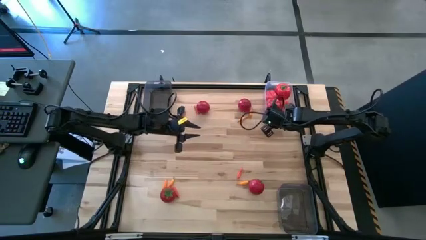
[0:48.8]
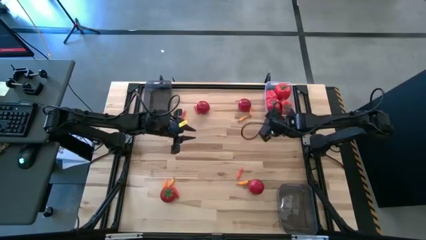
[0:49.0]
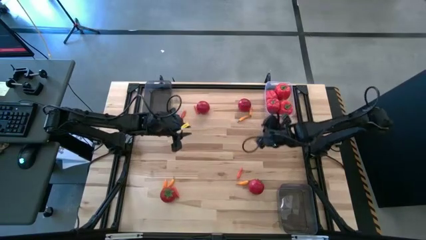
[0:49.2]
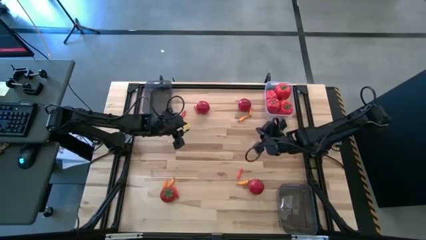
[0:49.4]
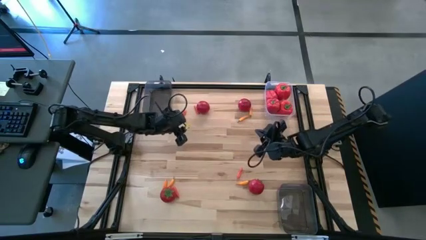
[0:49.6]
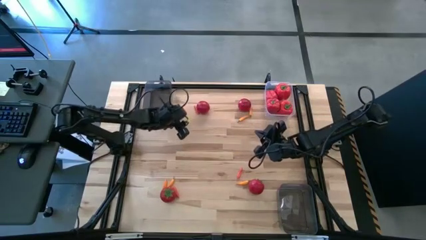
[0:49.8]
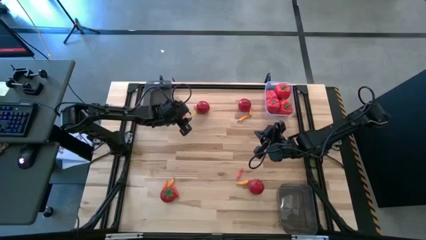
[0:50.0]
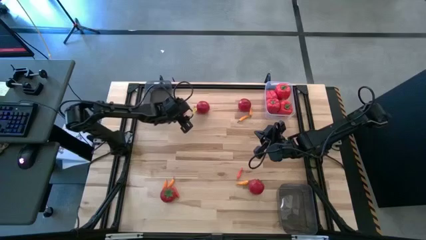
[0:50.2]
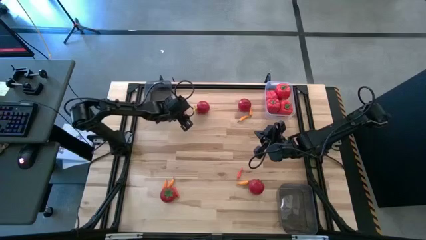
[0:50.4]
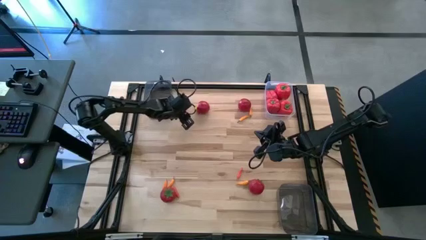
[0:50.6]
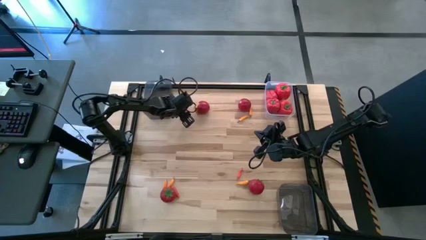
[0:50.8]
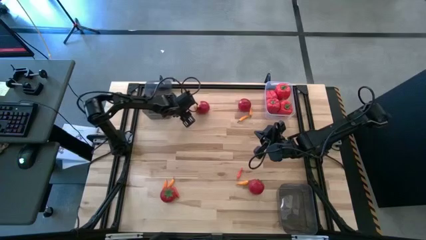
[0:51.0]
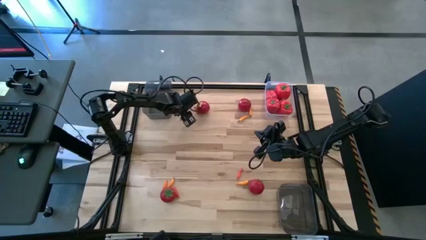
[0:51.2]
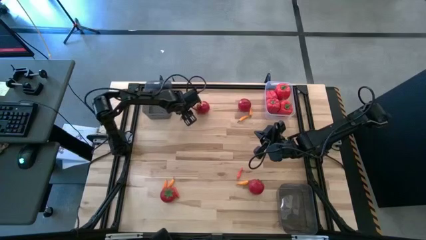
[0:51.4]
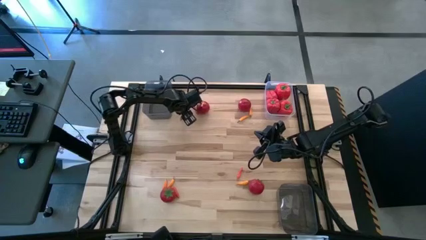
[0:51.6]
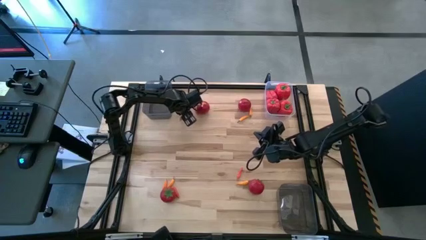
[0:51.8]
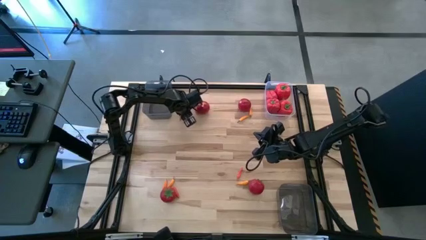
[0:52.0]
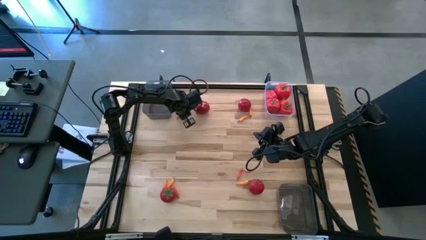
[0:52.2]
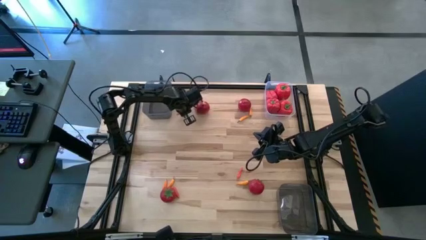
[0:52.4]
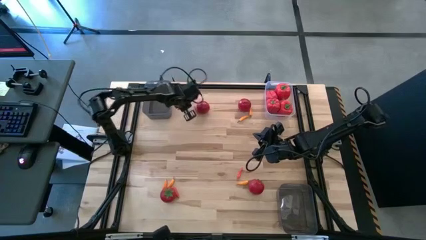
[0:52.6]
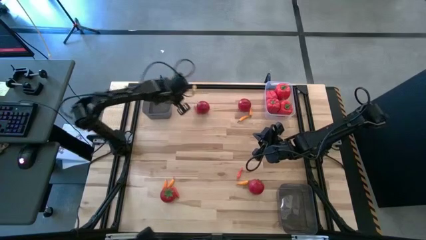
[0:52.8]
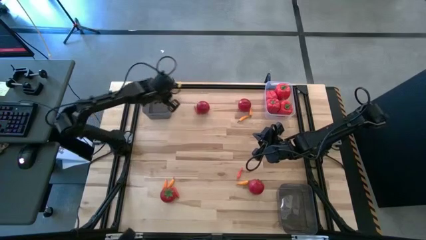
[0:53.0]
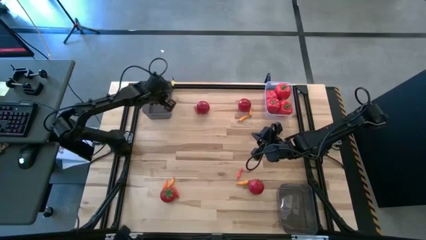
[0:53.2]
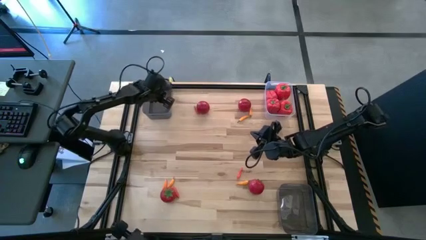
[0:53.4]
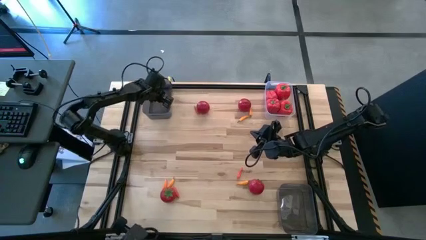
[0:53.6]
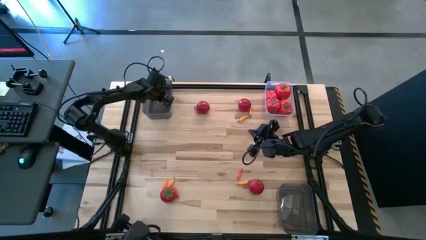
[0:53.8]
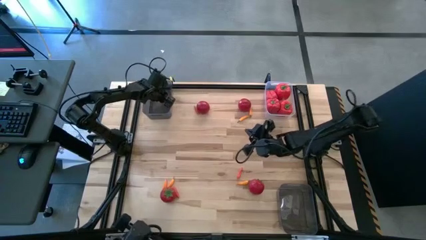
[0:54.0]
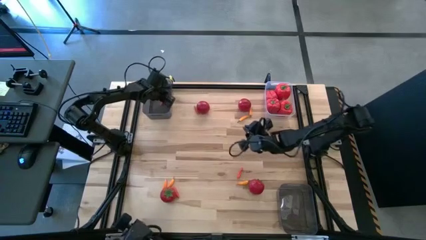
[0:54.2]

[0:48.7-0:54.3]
Task: Sort produce into baskets
Put the orange chili pepper into the top black bin

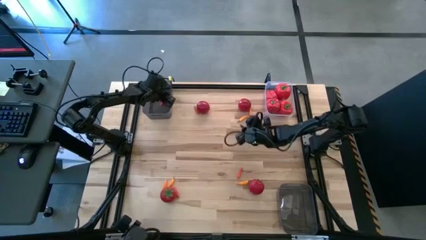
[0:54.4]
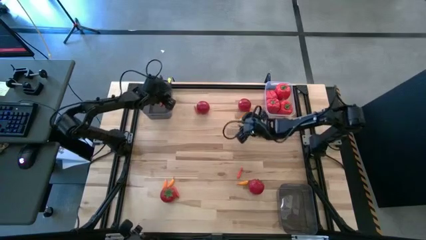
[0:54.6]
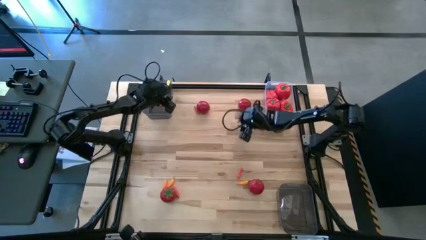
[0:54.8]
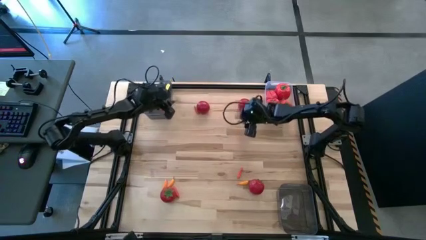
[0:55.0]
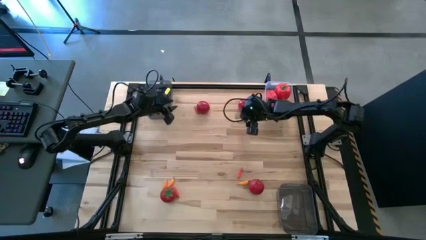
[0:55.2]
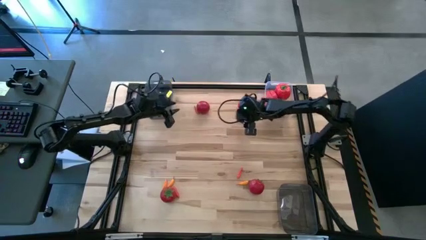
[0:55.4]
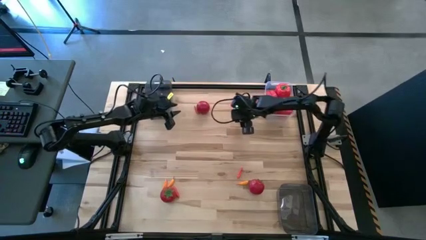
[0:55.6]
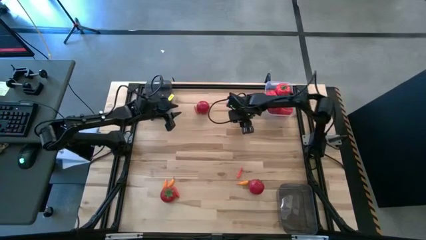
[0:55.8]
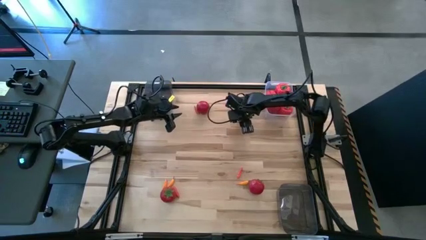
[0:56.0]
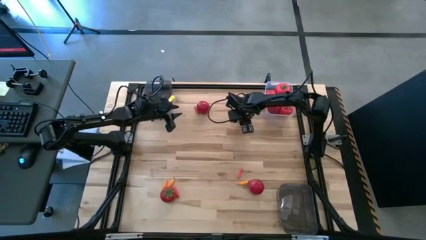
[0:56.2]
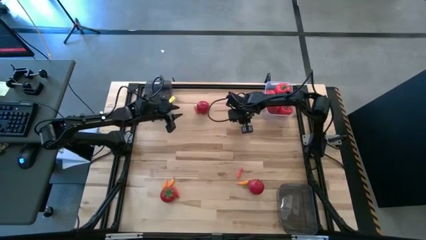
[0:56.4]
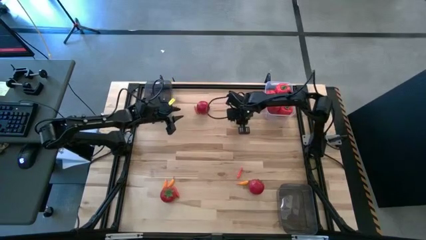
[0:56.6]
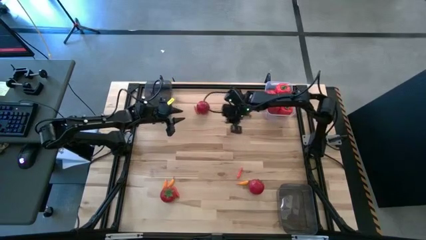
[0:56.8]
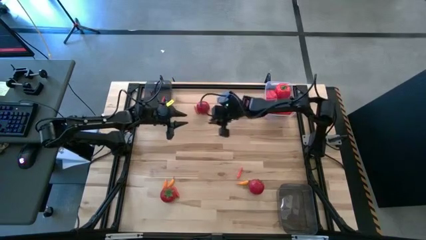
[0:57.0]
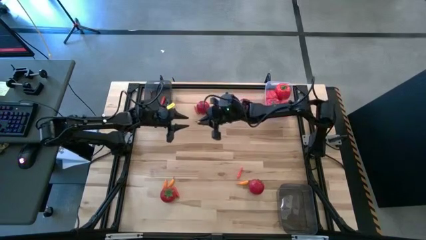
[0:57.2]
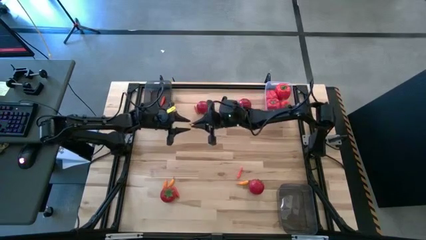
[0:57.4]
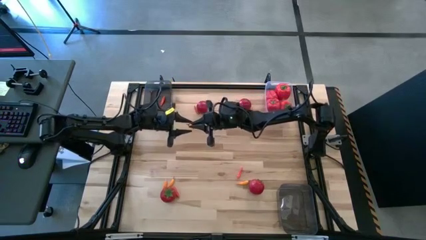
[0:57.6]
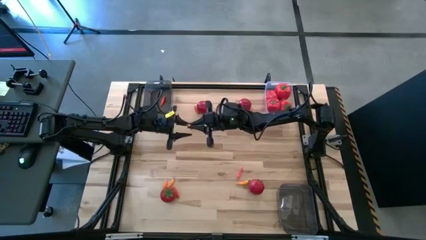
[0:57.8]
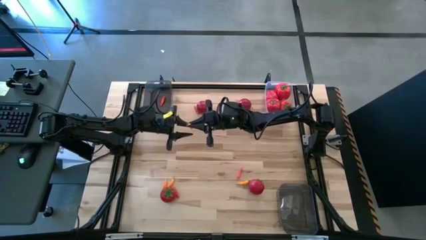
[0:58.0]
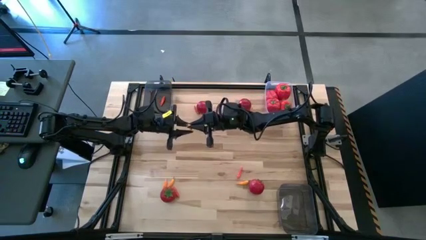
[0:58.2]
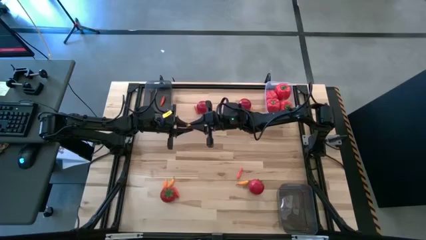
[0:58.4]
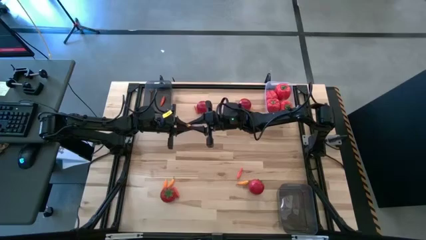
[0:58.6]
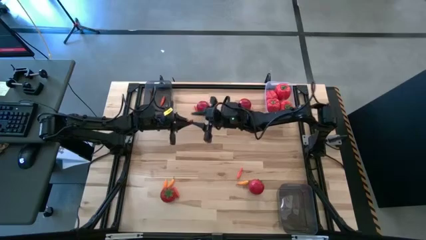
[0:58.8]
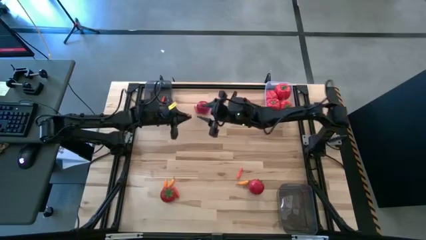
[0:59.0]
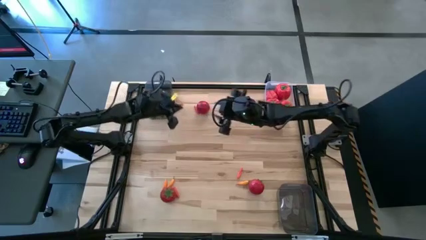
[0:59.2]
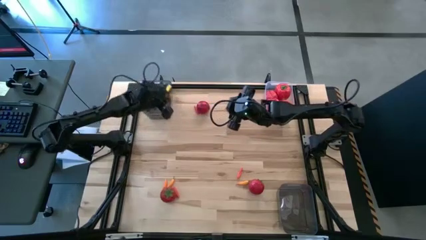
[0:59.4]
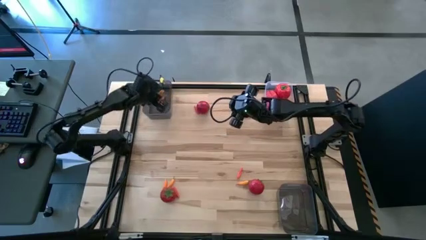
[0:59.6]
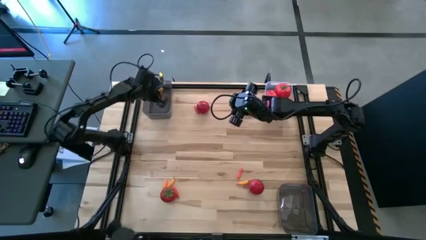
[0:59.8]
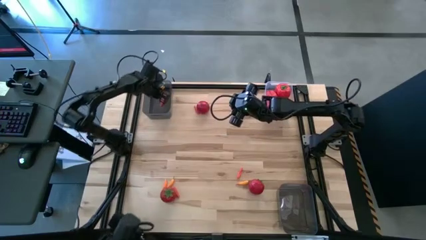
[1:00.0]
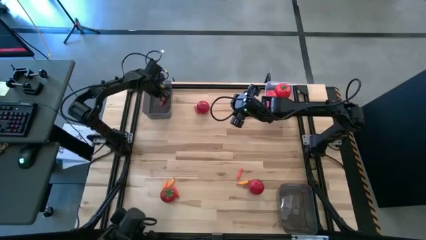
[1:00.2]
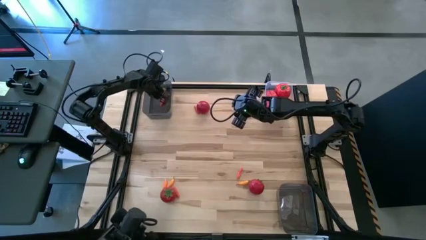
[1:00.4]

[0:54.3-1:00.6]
Put the yellow chili pepper into the top black bin

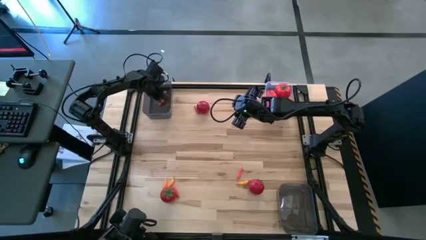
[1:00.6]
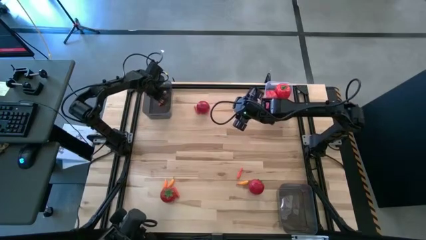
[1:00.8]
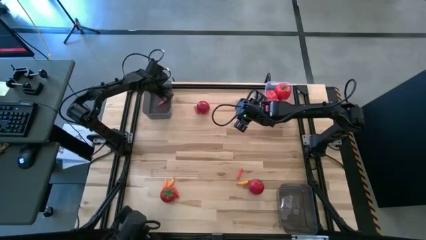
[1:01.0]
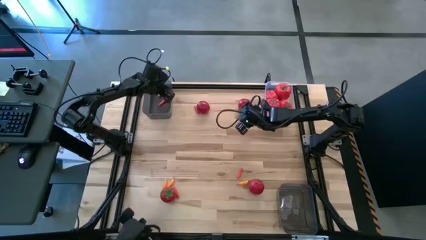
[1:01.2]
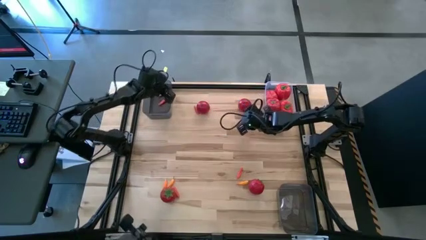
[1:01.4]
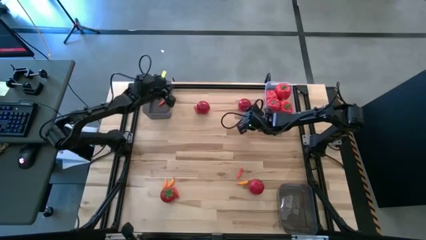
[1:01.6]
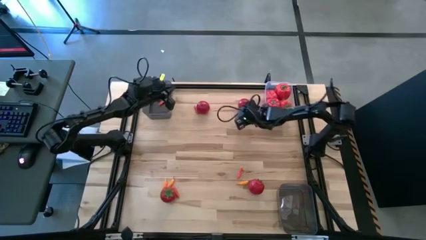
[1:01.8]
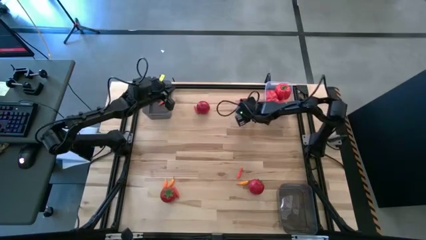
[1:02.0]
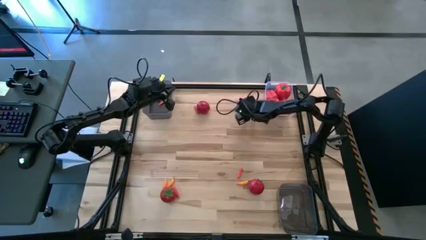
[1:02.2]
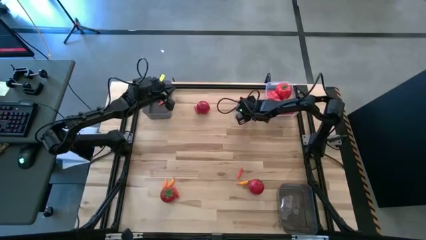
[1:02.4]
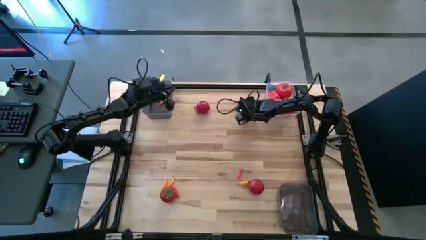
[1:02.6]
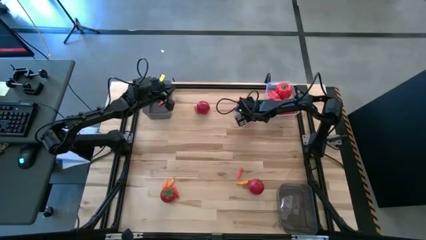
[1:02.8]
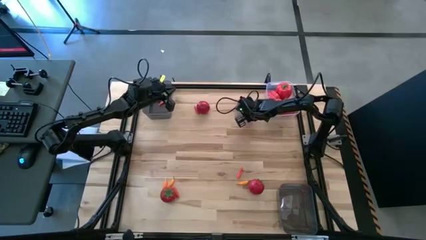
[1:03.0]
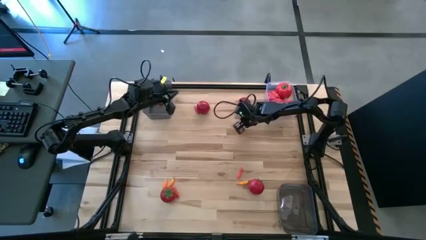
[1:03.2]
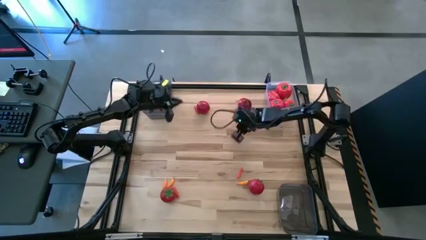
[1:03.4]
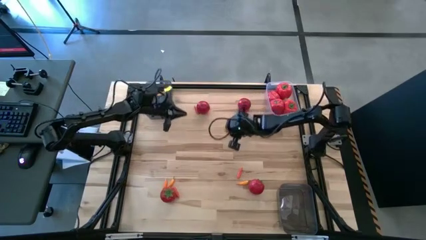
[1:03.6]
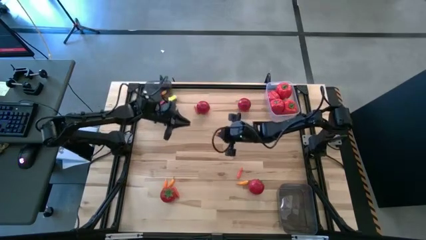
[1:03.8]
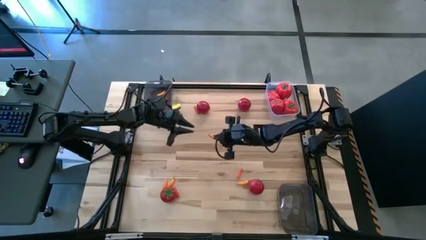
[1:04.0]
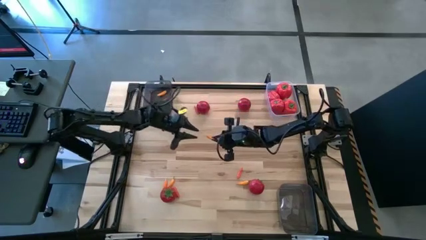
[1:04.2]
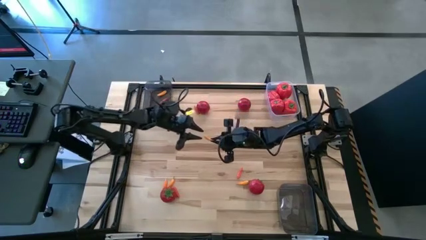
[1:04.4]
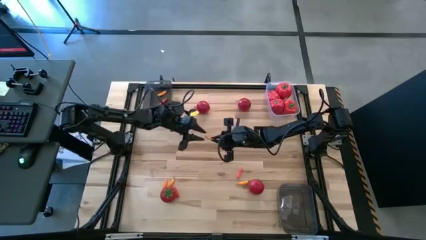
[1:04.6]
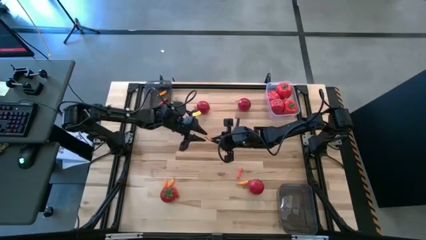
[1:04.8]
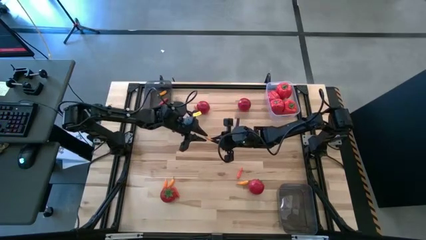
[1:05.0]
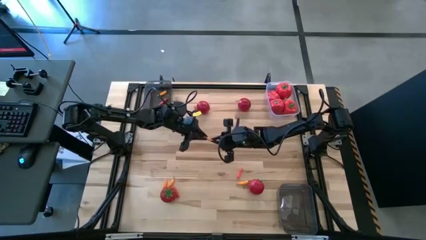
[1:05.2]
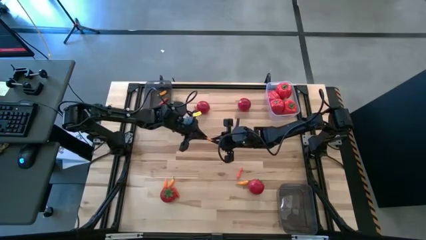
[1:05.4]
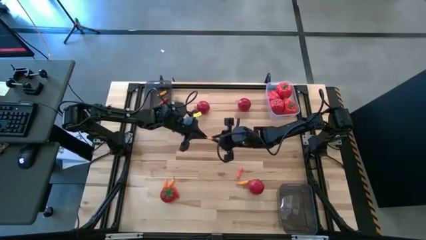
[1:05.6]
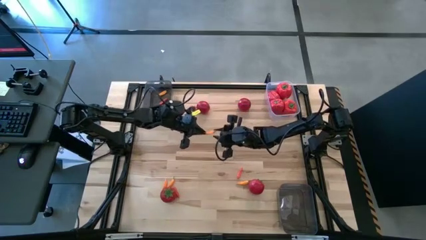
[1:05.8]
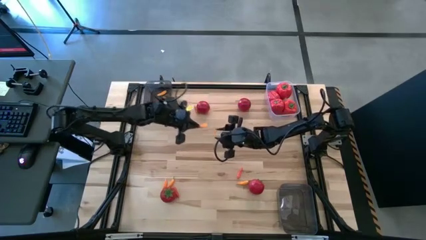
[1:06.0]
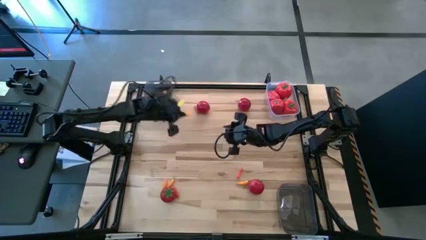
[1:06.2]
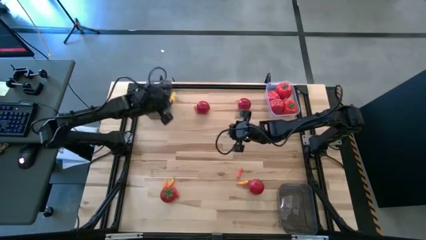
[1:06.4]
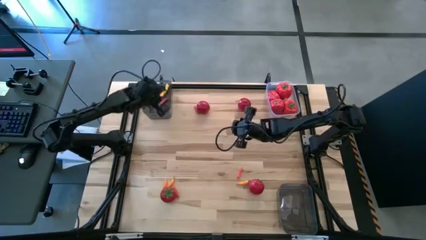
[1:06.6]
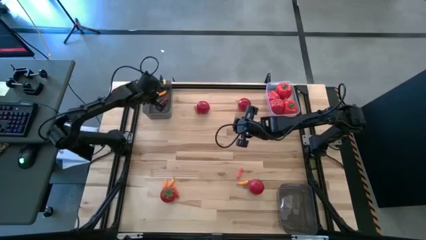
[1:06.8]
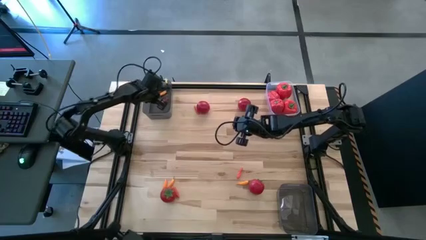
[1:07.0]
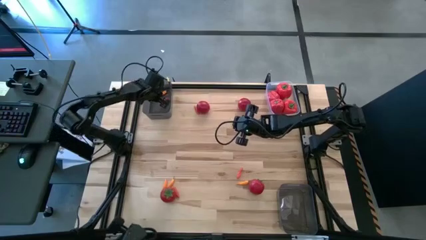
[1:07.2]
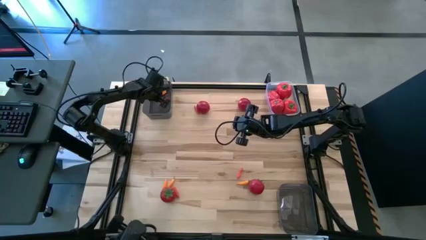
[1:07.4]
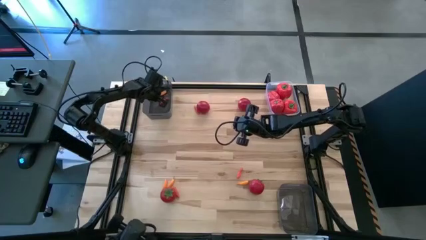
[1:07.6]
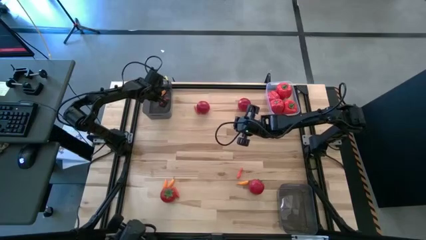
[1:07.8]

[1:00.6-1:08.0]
Put the yellow chili pepper into the top black bin
